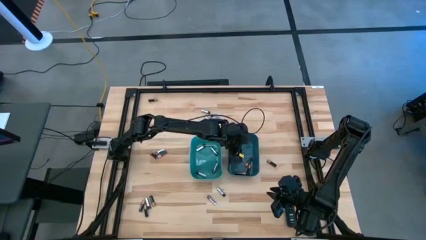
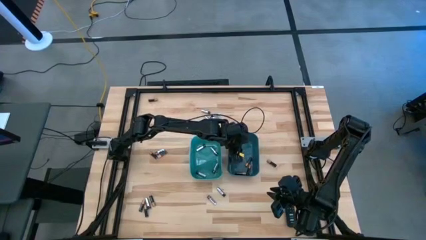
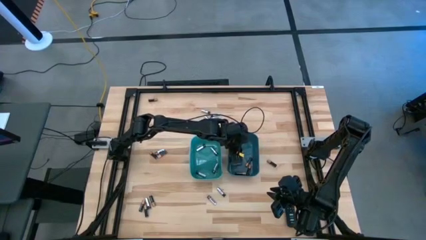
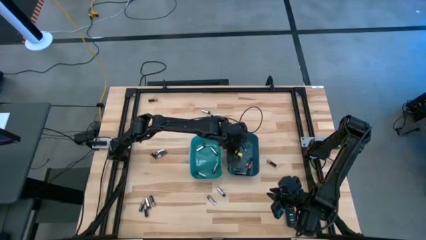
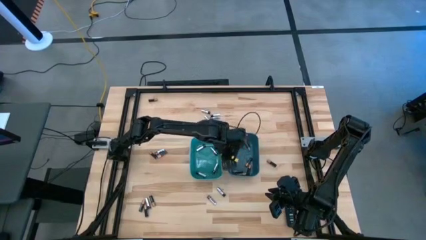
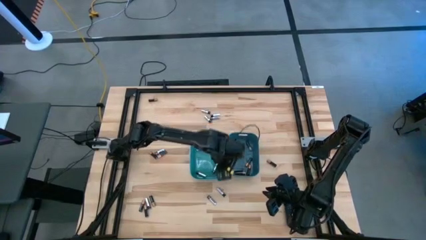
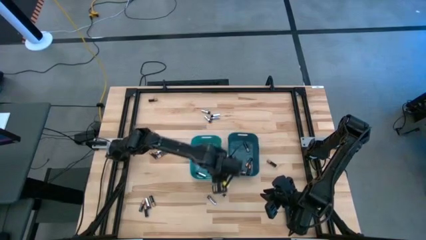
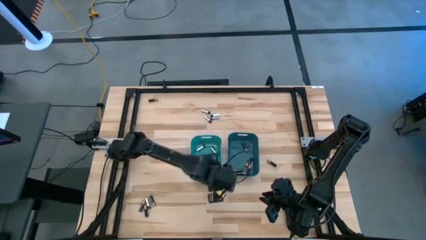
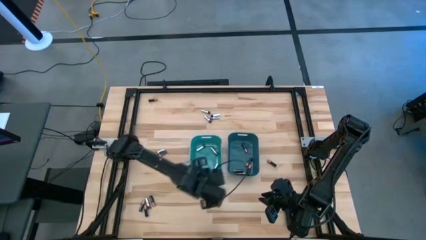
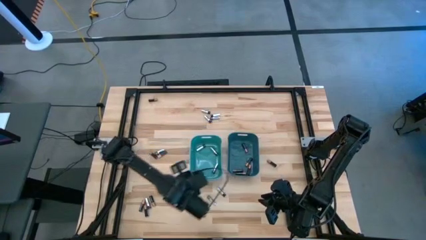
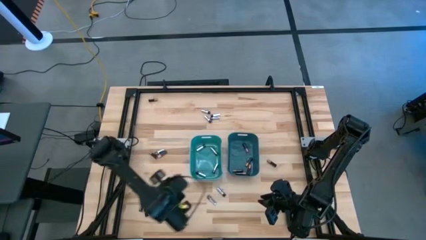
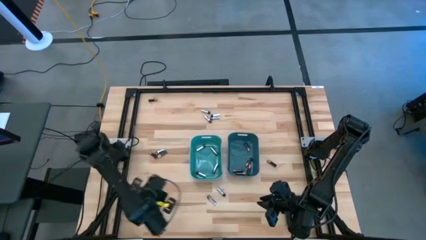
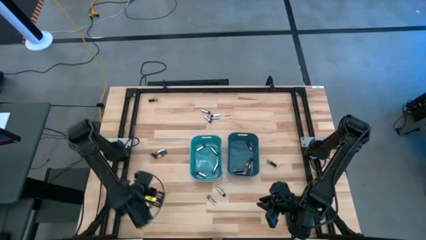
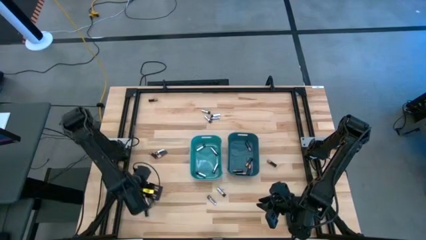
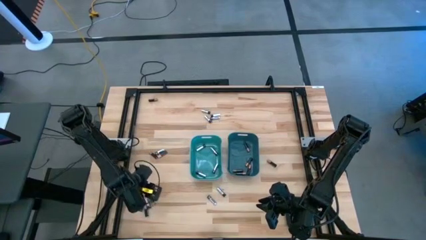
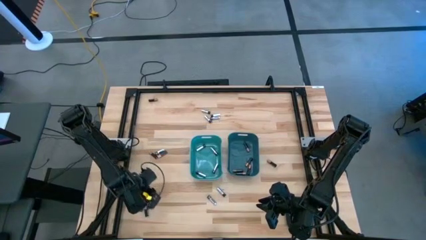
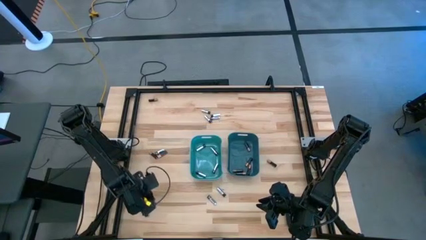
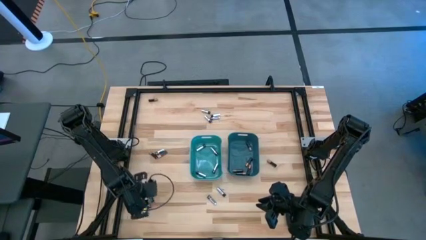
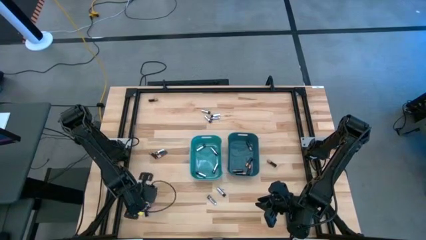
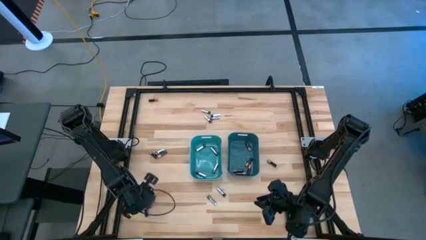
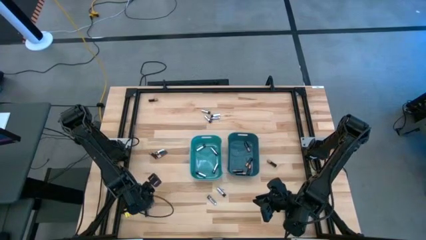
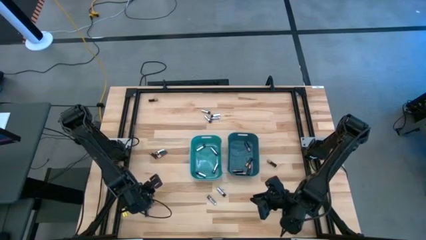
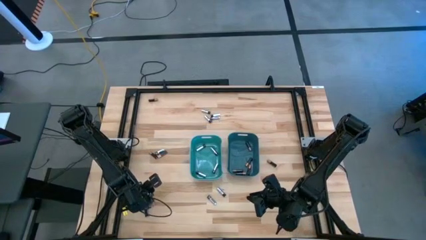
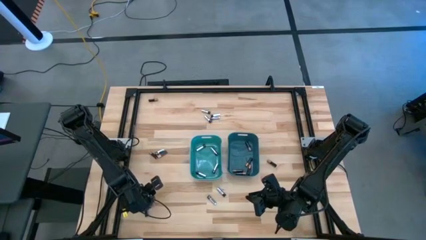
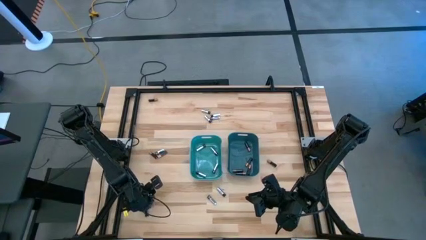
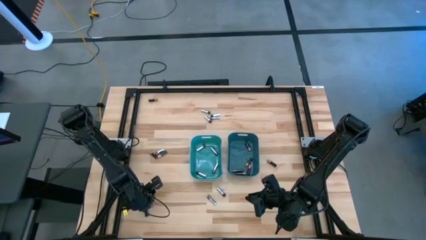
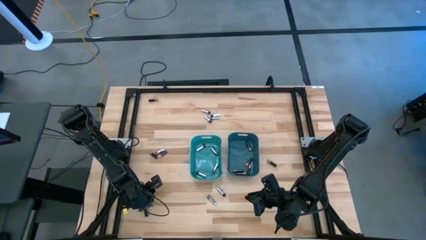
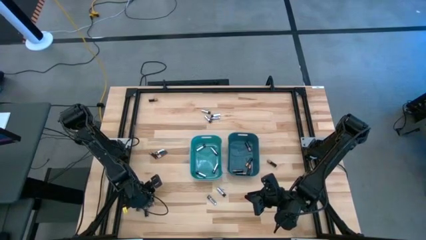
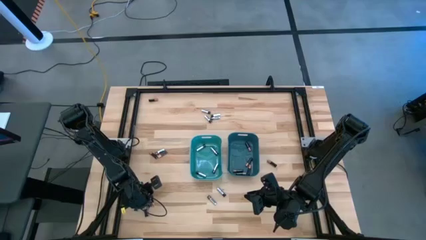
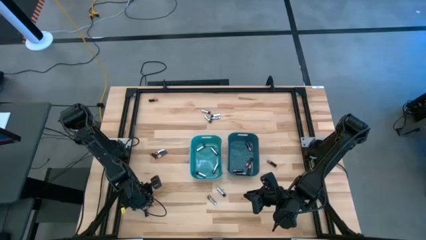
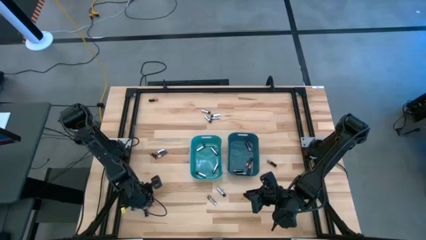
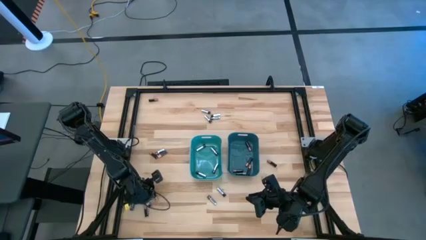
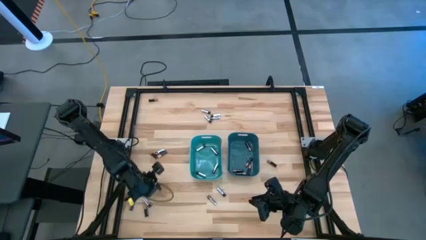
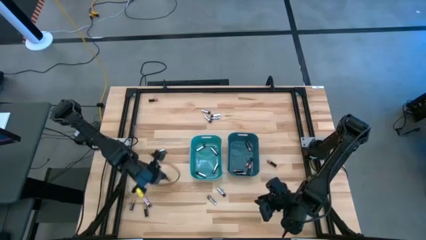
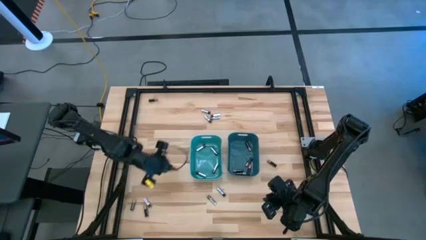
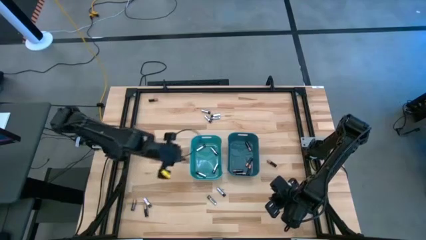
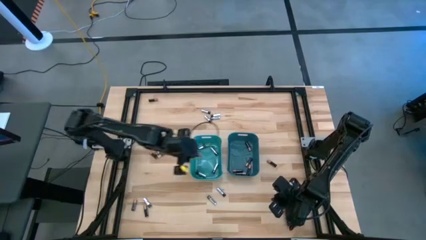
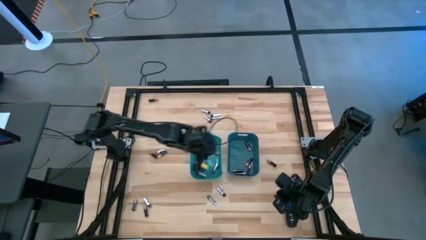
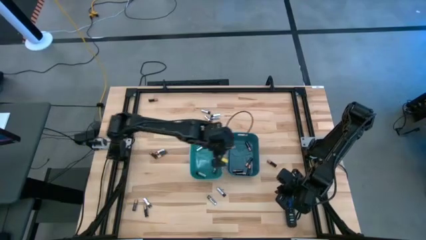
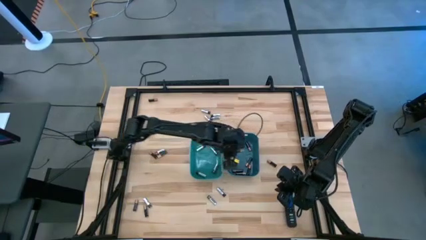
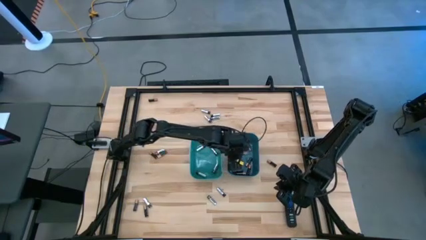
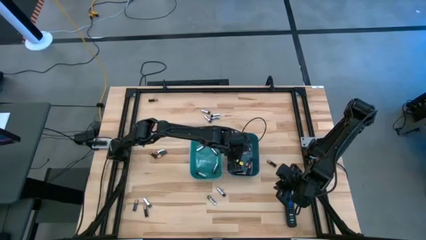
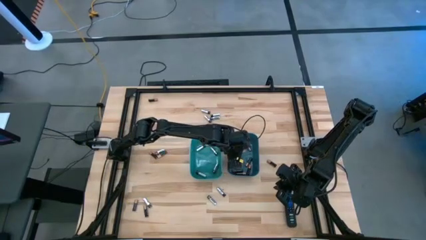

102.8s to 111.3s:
Task: Sort batteries
Put the black battery into the blue bin

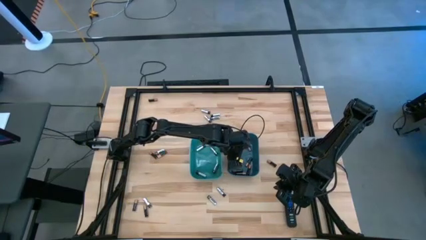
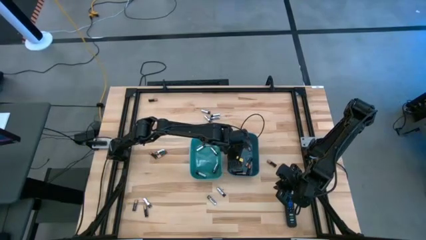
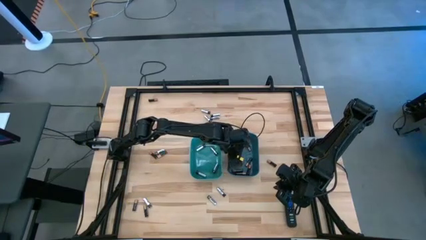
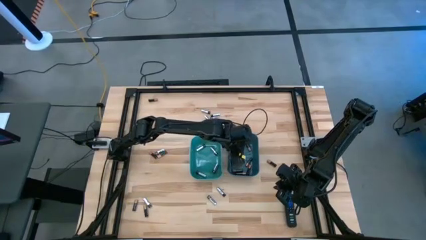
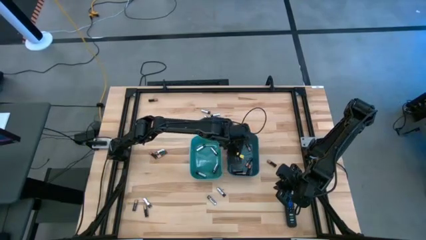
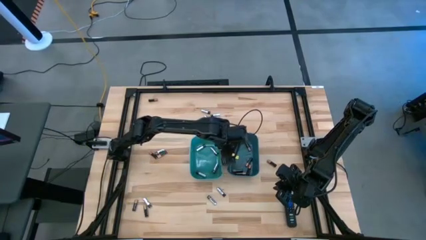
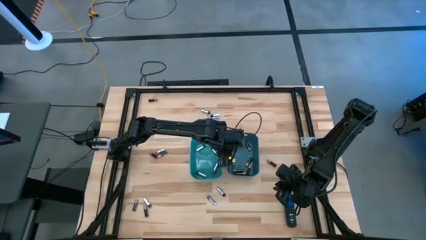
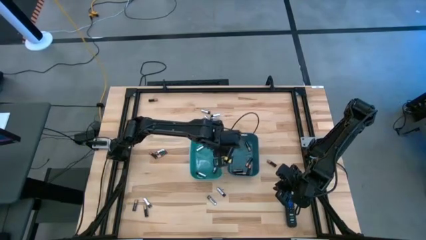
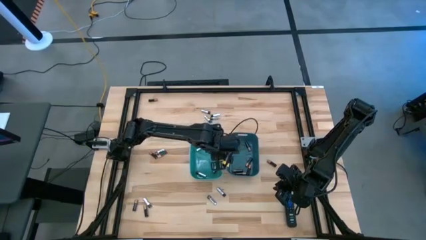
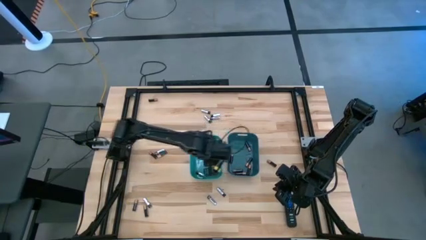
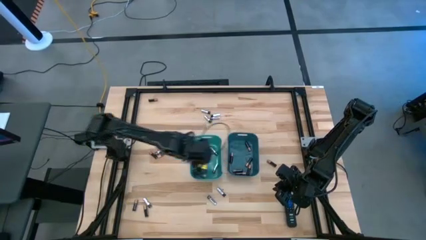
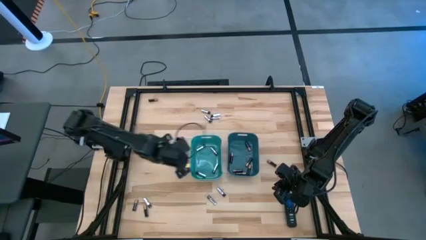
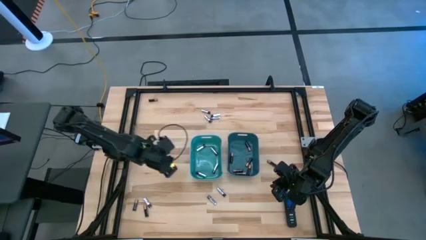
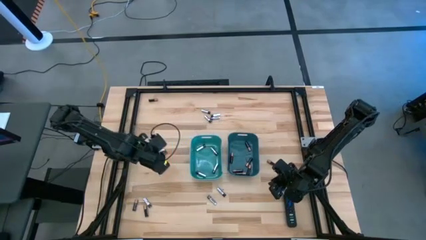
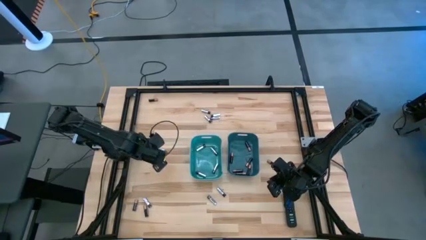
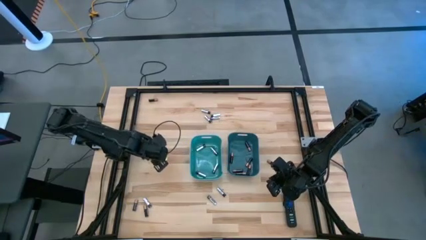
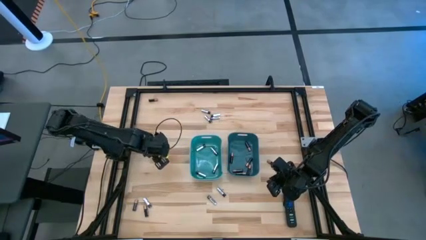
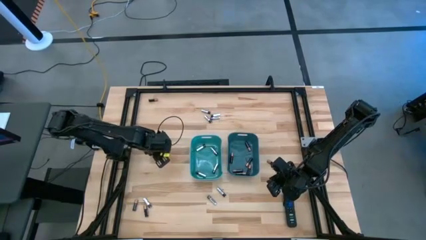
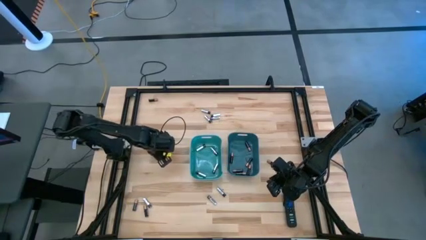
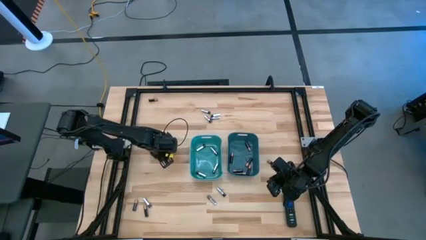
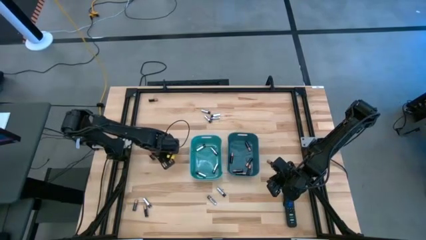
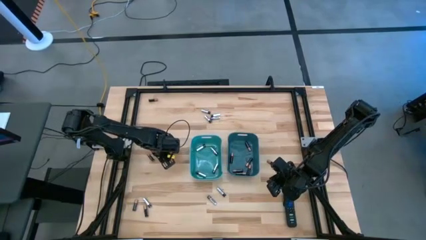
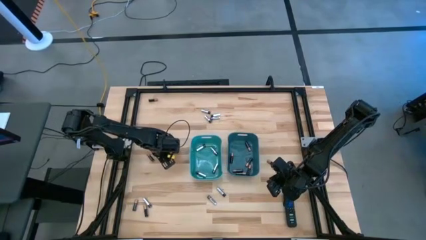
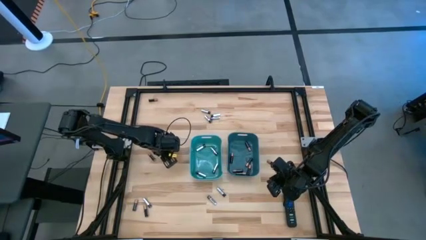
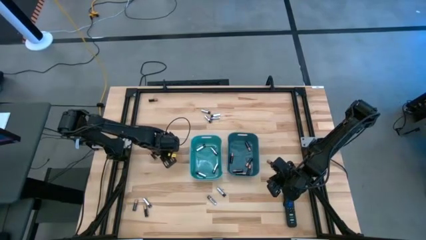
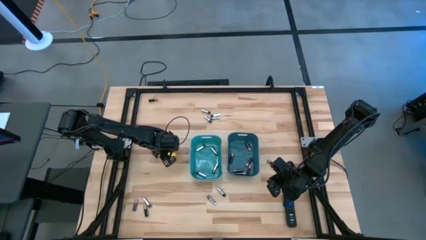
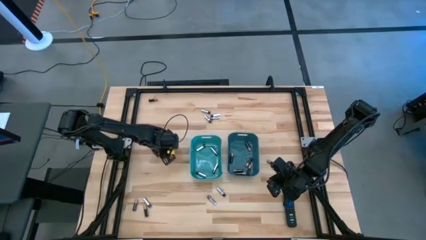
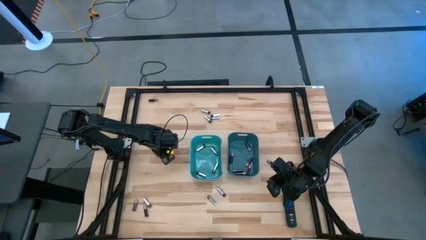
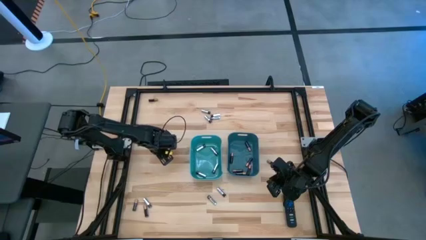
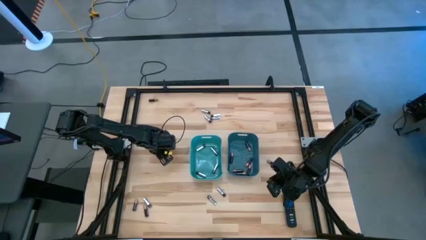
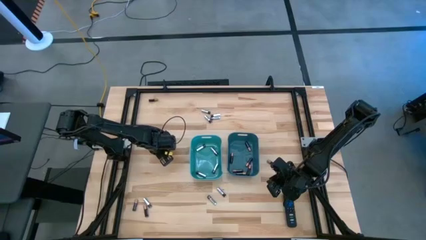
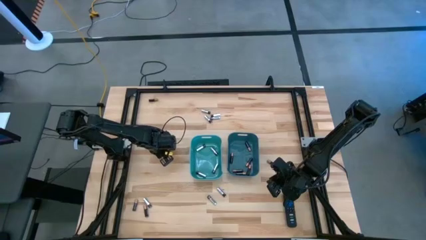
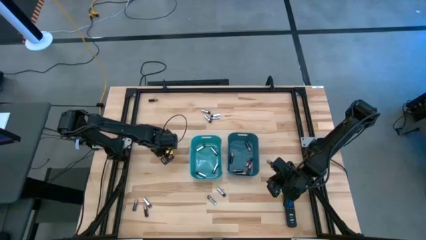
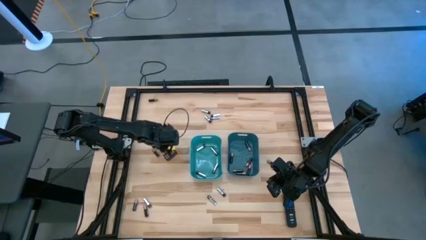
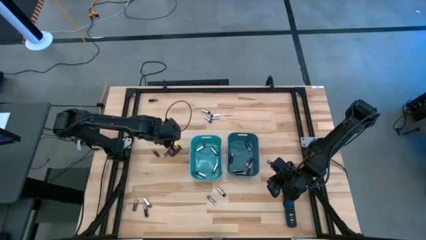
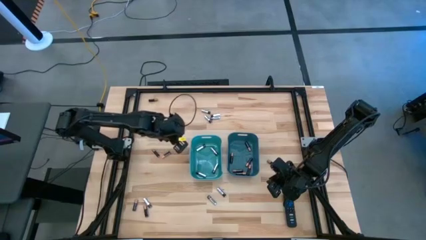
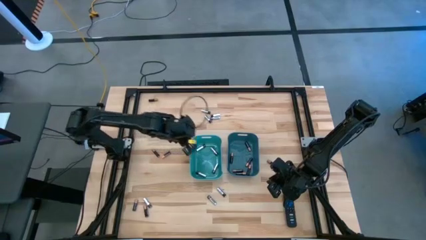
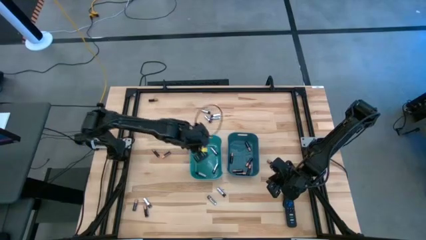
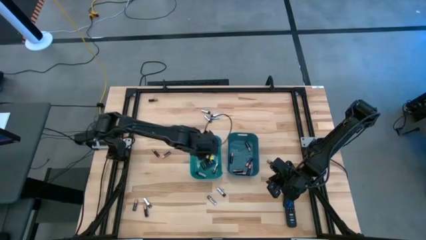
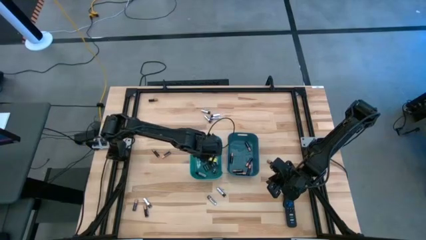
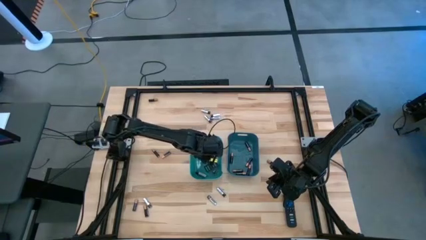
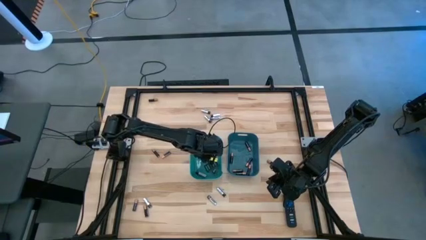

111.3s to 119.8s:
Put the silver battery into the green bin
